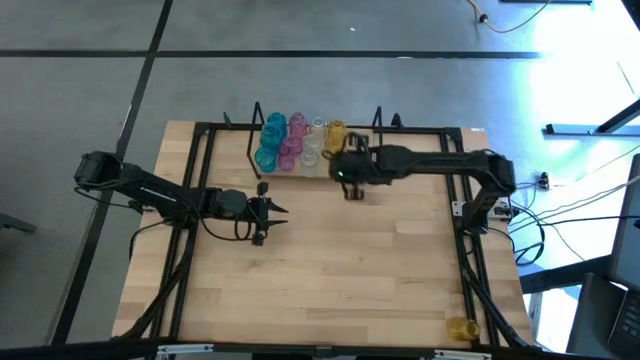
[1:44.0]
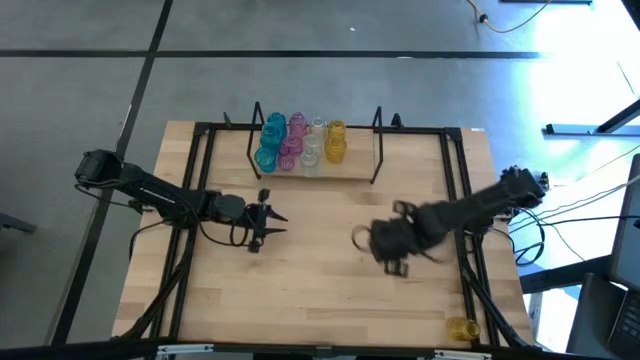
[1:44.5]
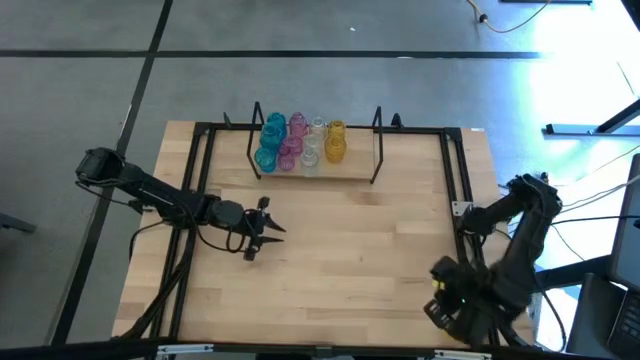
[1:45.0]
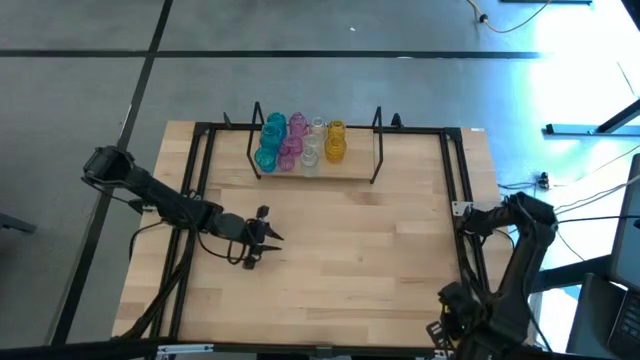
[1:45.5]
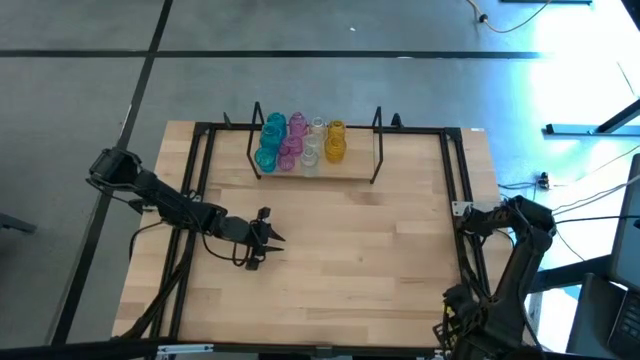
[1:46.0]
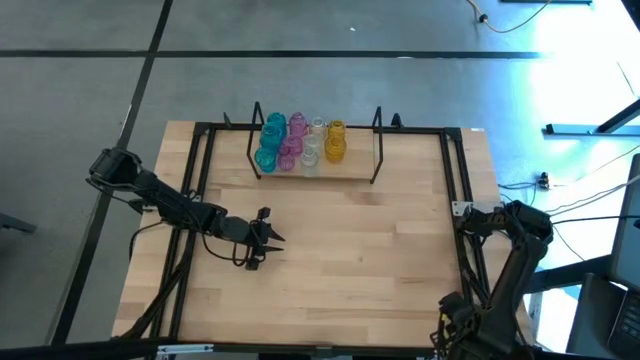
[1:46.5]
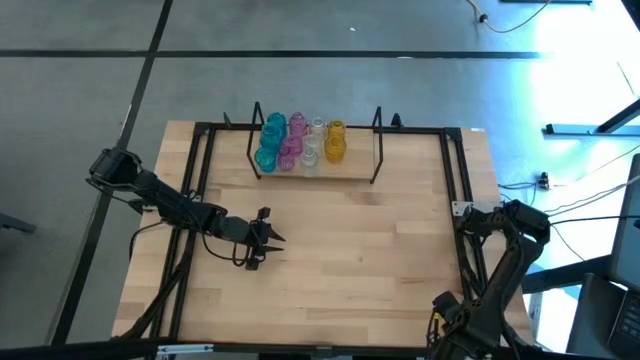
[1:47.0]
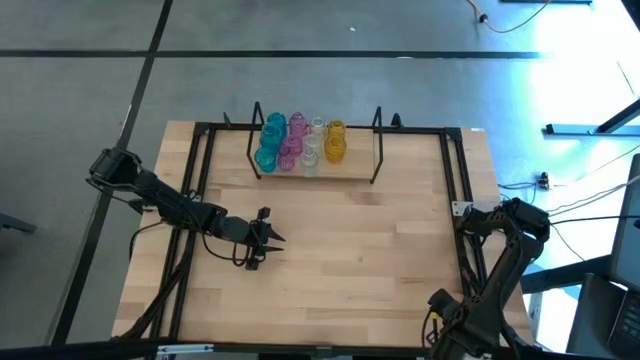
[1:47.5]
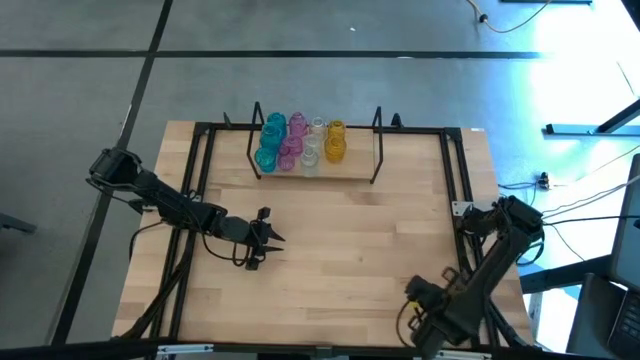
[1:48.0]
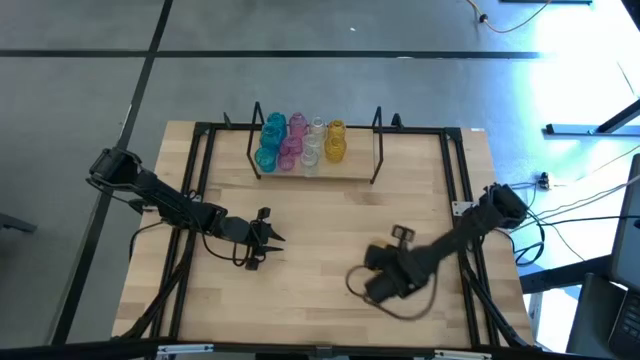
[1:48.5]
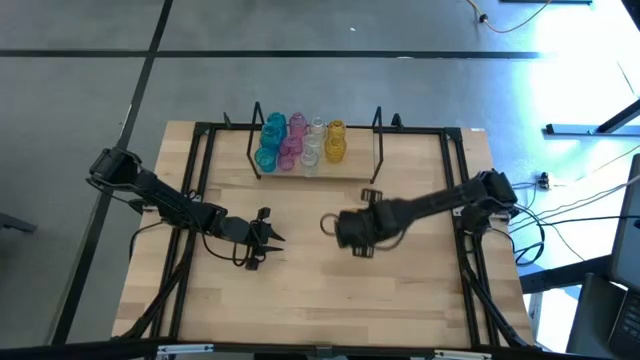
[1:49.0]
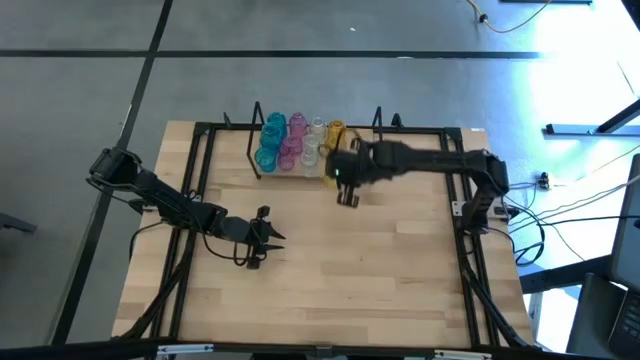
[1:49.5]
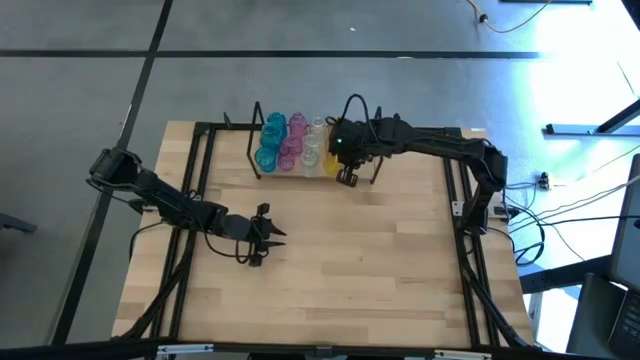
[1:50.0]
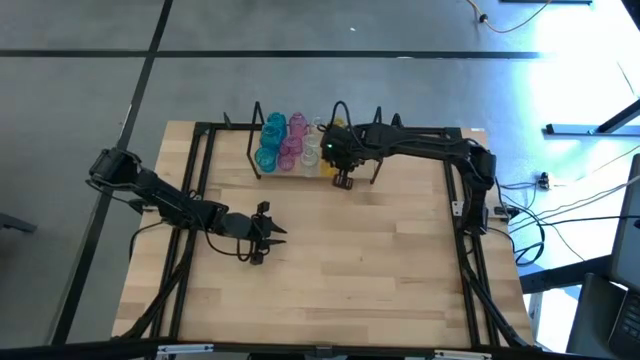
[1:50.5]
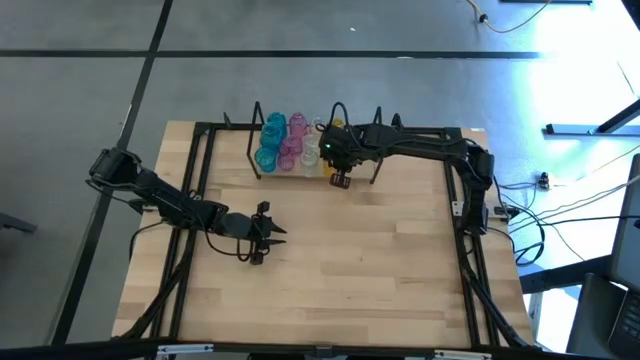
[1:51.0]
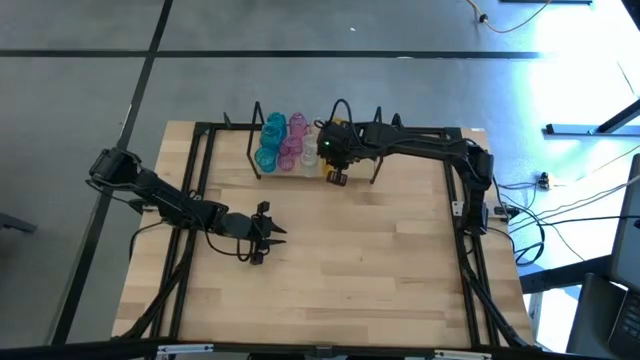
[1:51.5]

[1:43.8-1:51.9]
Task: sort vases onto shelf
Put the yellow vase on the shelf aligned with the other yellow vases

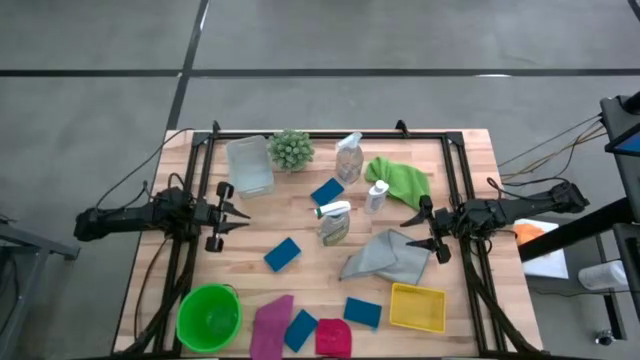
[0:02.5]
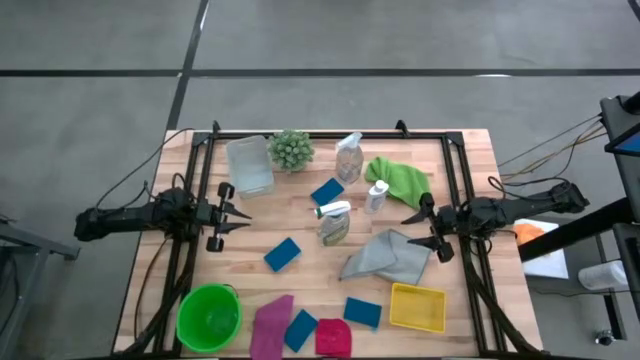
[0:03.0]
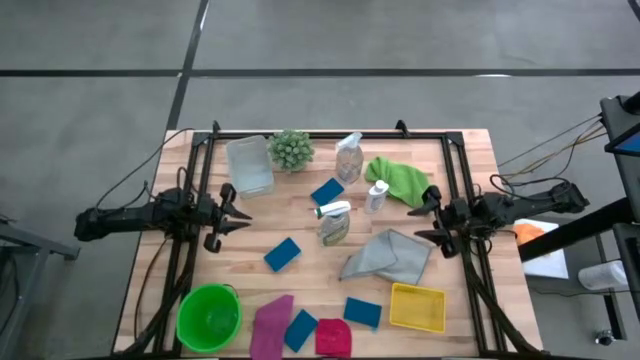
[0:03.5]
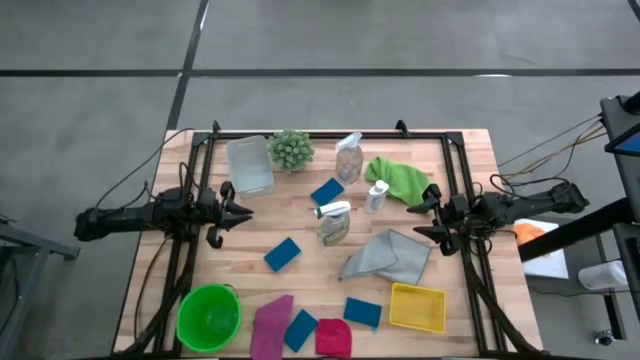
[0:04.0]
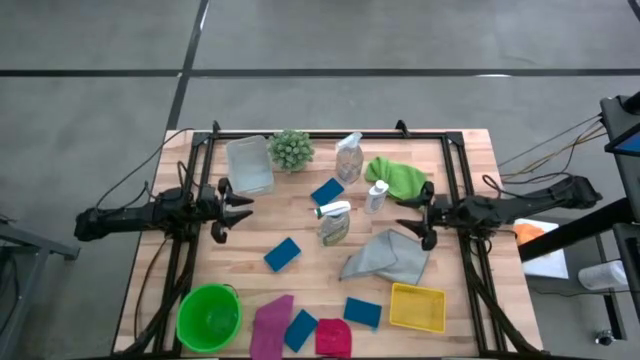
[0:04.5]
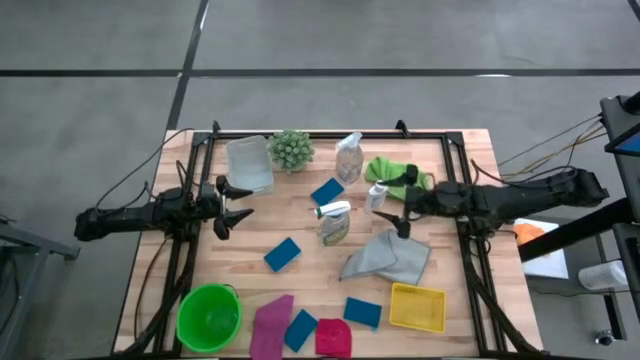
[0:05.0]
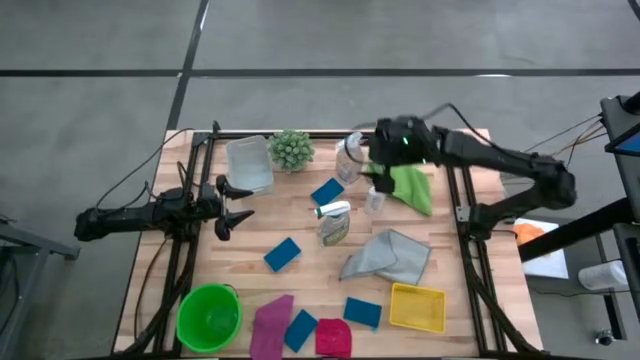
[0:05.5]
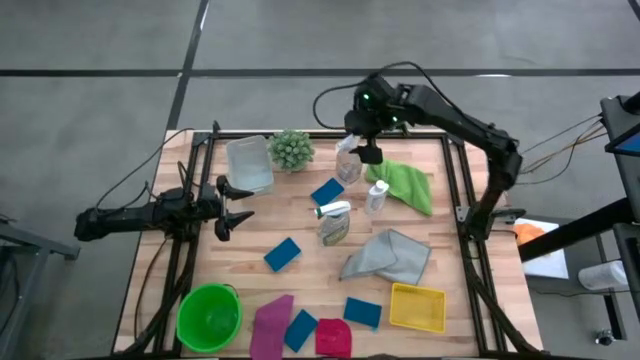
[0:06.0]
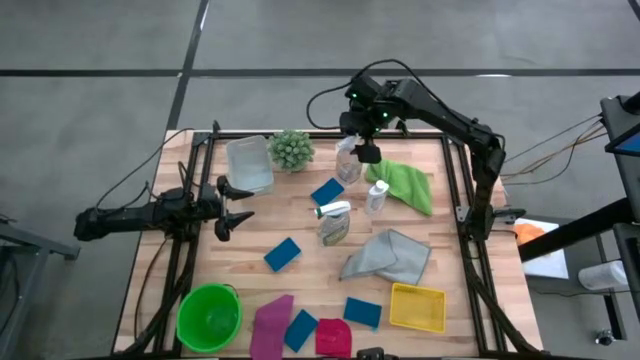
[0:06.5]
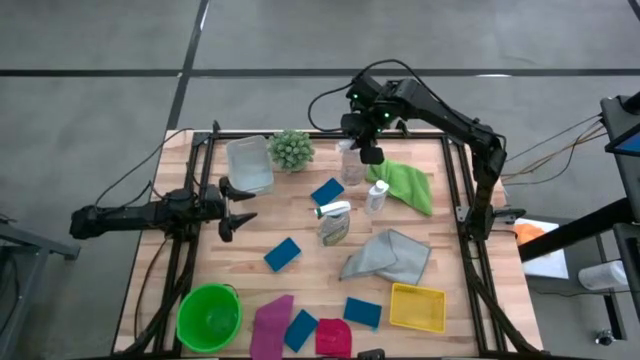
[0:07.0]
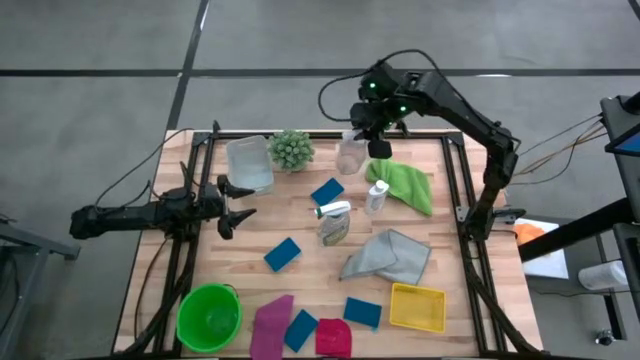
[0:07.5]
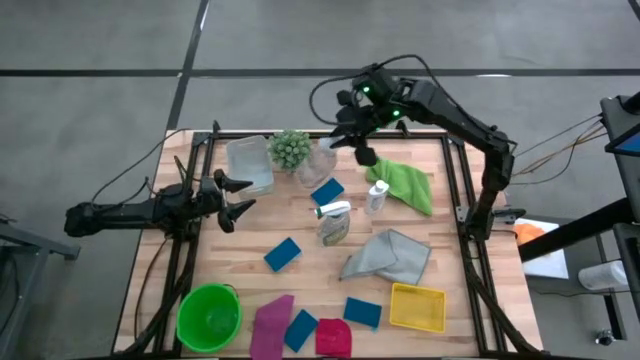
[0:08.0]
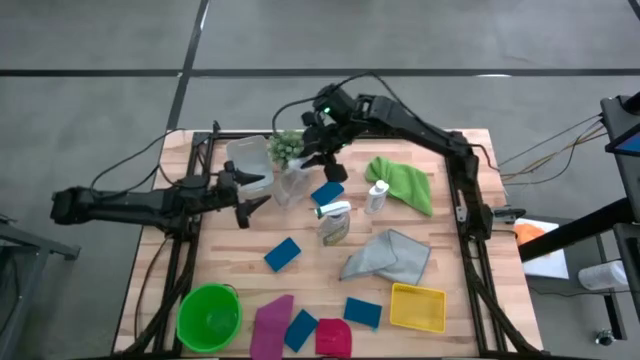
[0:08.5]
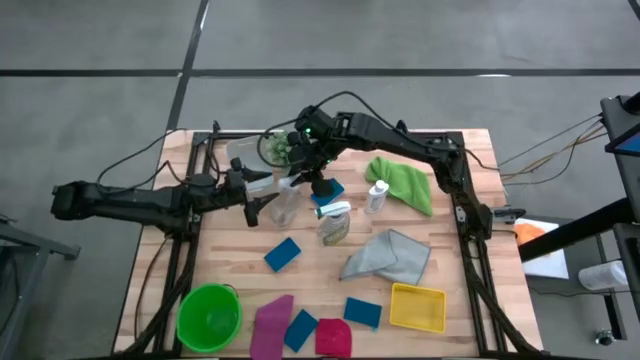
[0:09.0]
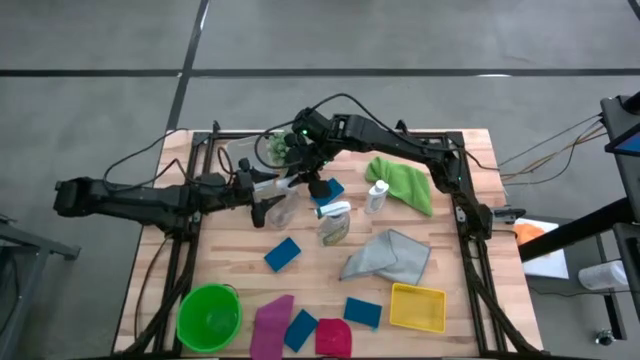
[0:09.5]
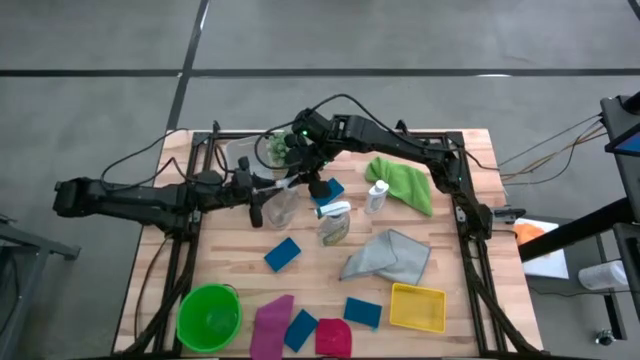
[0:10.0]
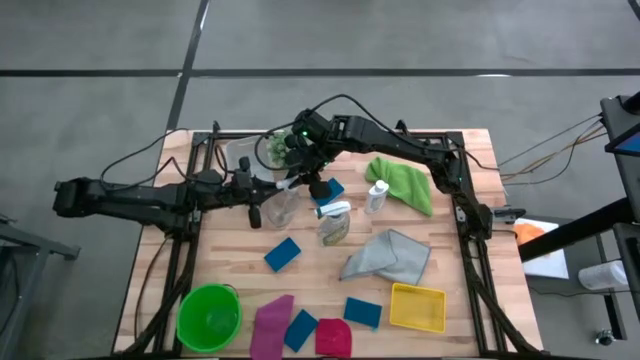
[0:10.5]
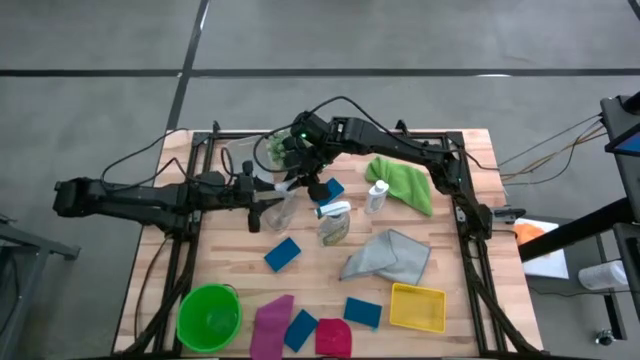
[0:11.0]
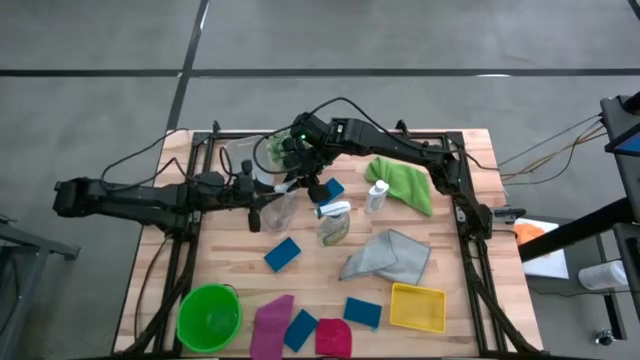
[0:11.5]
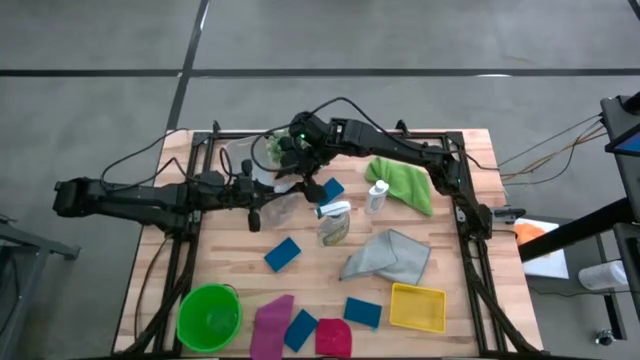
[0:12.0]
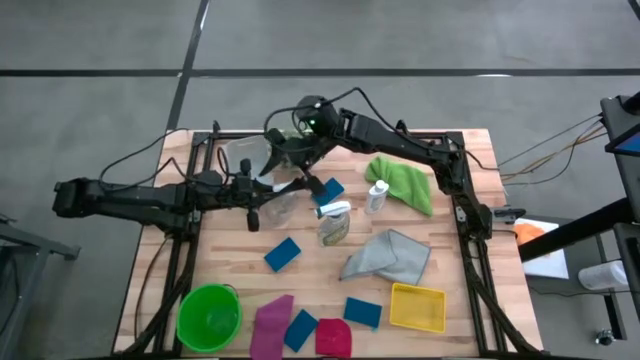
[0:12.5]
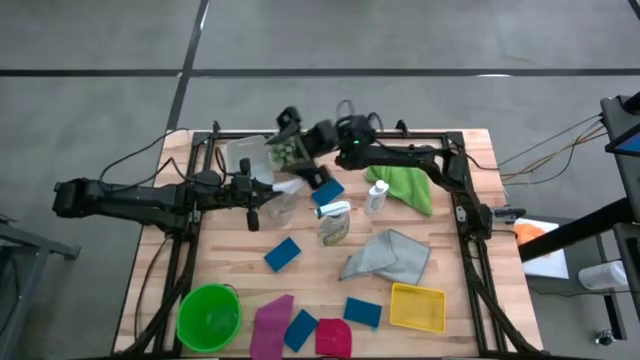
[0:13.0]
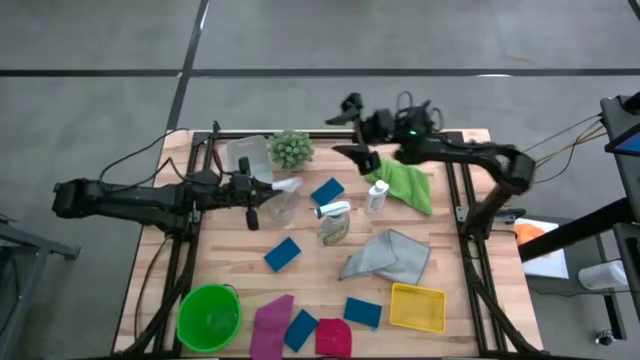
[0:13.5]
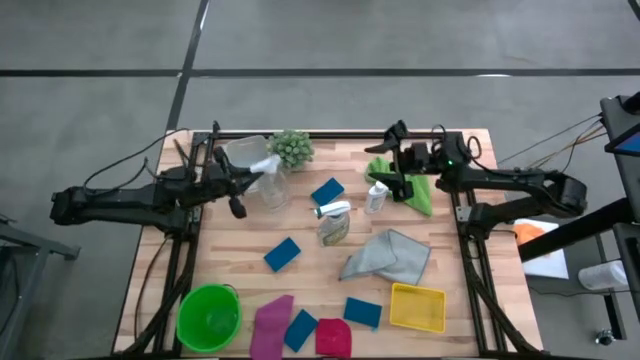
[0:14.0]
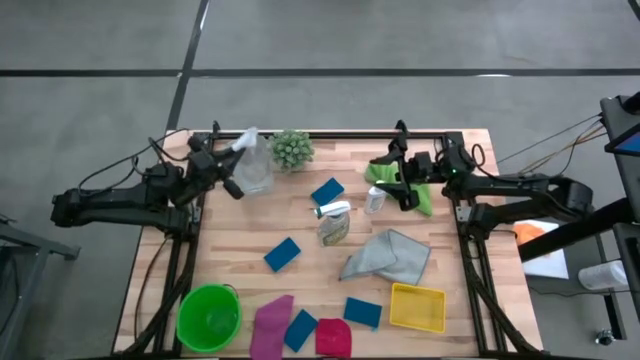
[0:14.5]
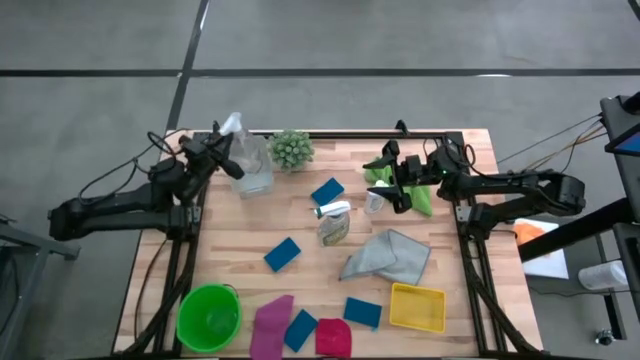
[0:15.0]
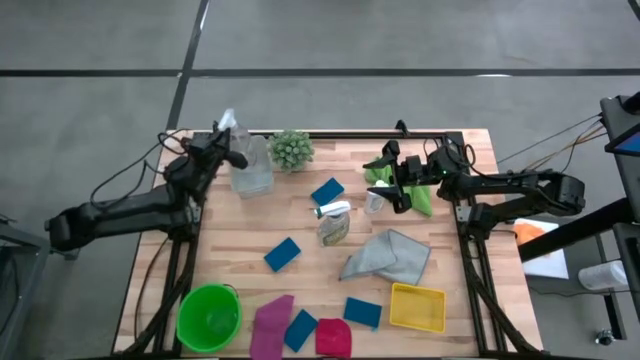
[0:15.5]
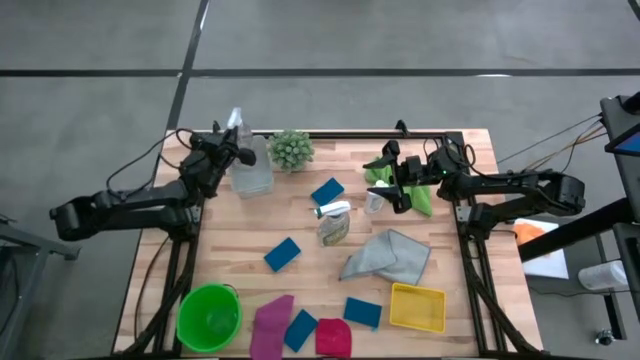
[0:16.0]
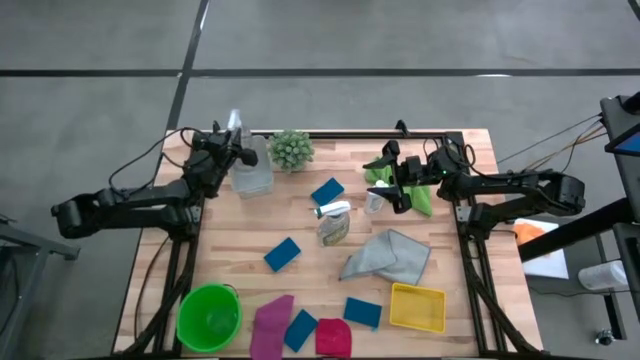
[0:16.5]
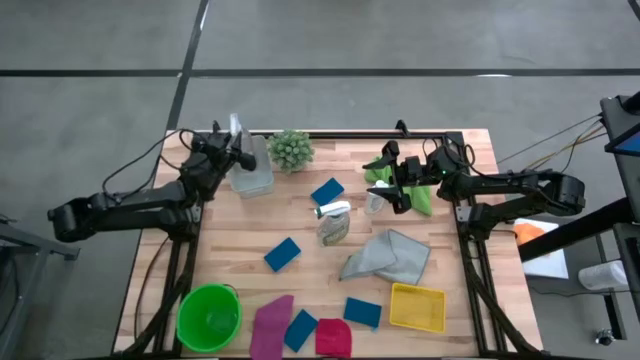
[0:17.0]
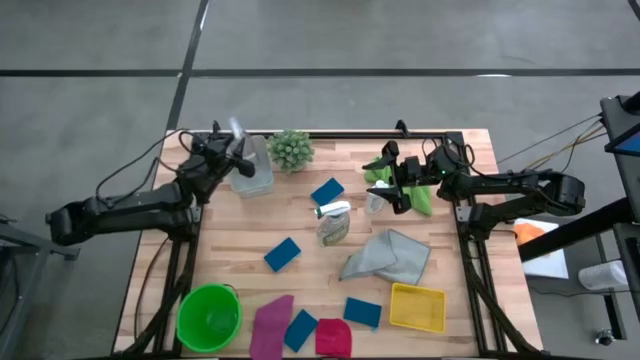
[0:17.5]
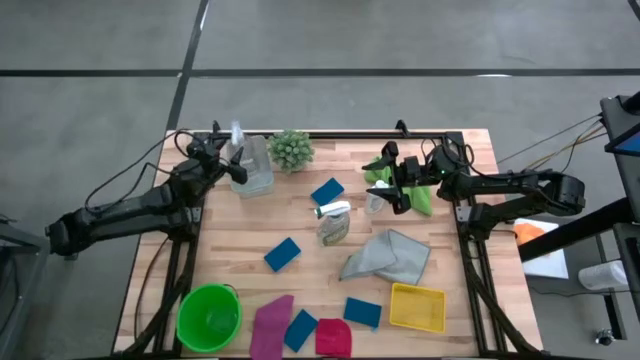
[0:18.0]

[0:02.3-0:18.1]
Task: Pick & Place Kitchen Items
Put the transparent spray bottle into the gray bin
